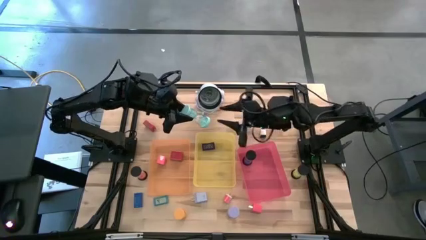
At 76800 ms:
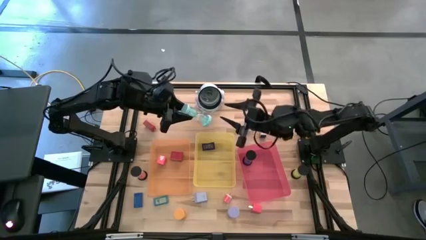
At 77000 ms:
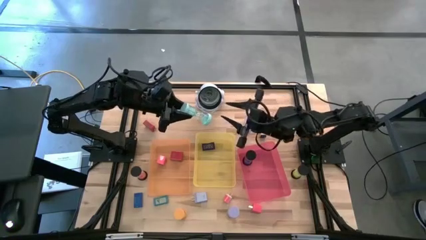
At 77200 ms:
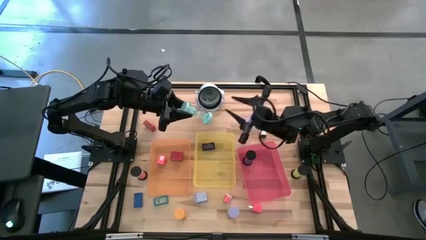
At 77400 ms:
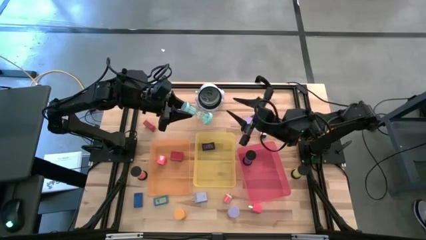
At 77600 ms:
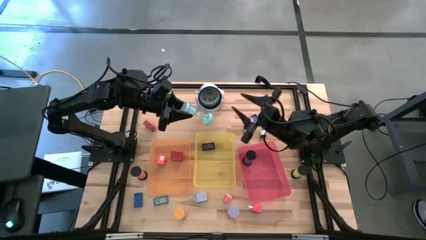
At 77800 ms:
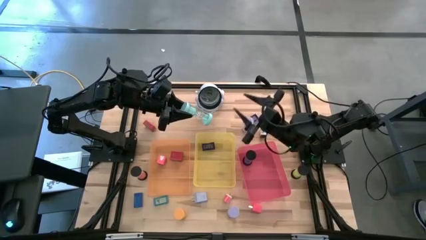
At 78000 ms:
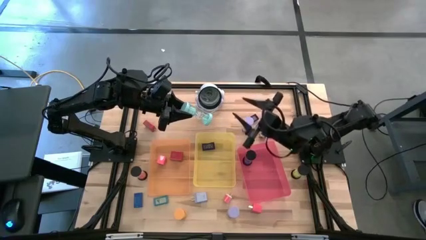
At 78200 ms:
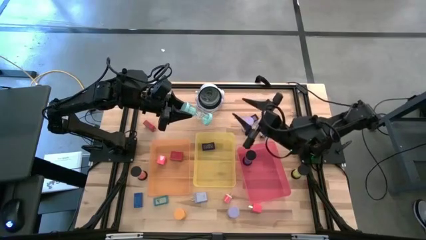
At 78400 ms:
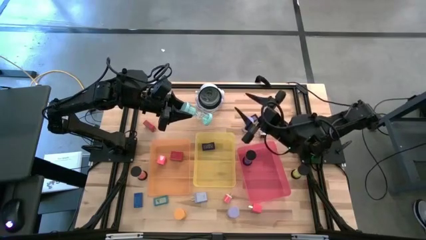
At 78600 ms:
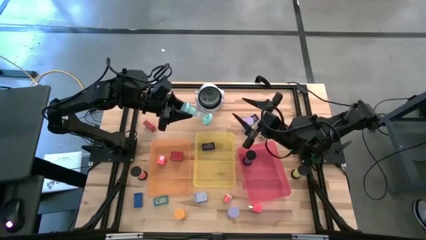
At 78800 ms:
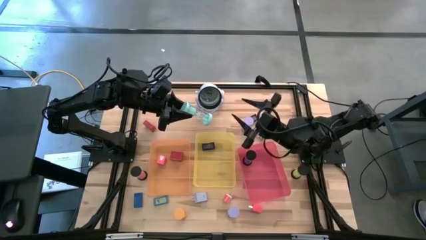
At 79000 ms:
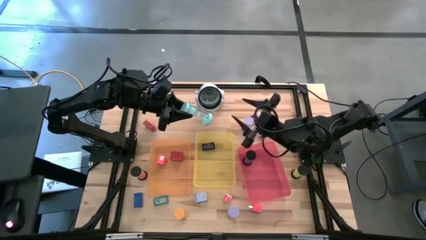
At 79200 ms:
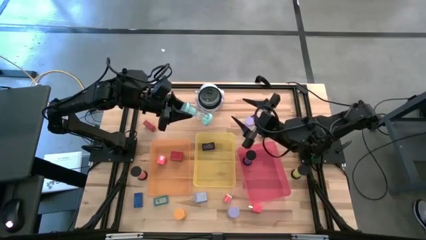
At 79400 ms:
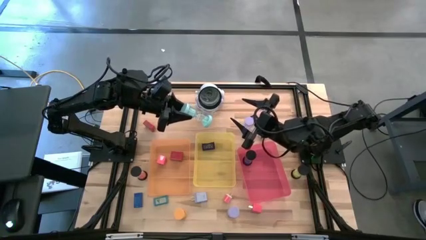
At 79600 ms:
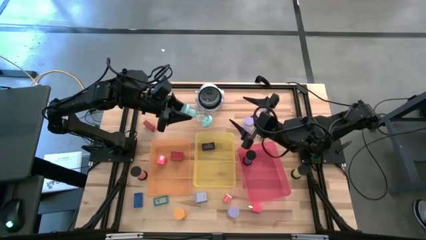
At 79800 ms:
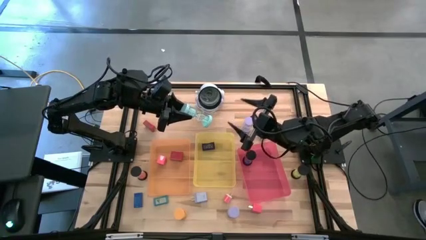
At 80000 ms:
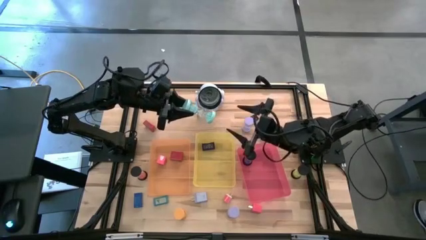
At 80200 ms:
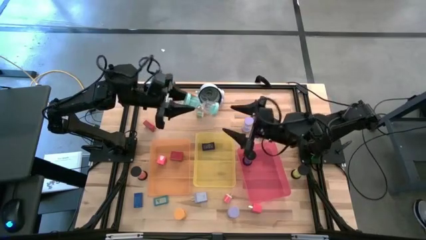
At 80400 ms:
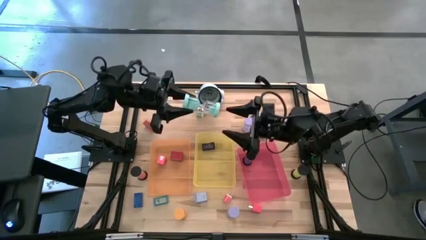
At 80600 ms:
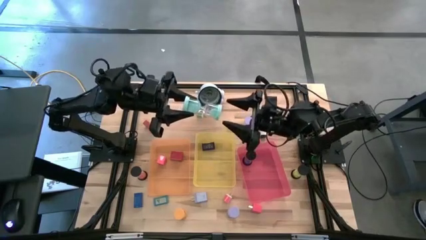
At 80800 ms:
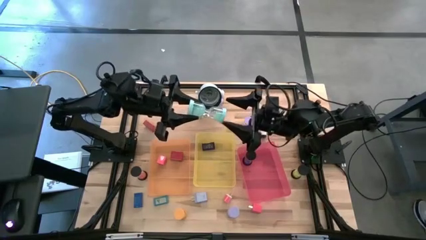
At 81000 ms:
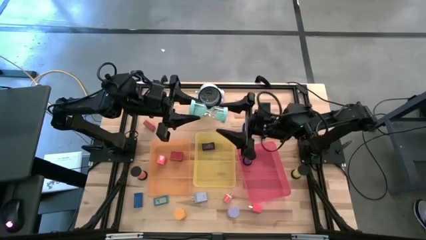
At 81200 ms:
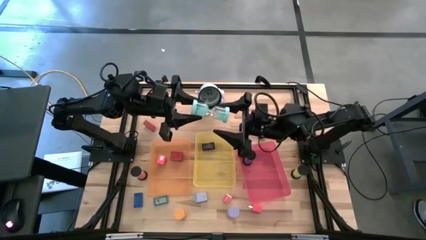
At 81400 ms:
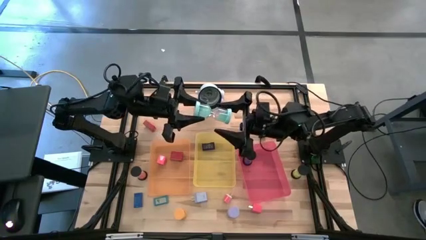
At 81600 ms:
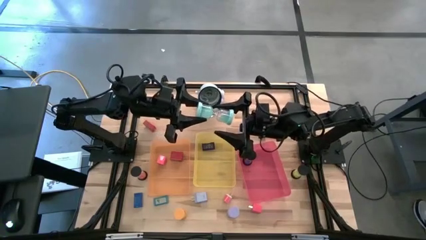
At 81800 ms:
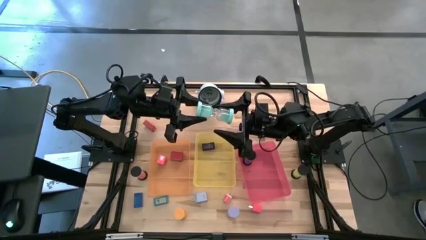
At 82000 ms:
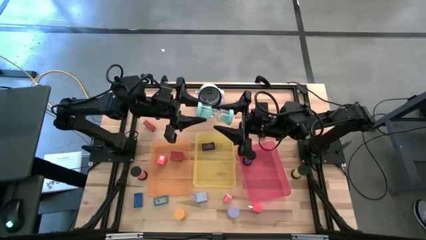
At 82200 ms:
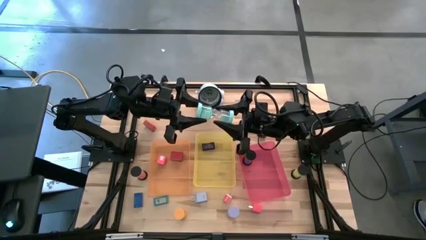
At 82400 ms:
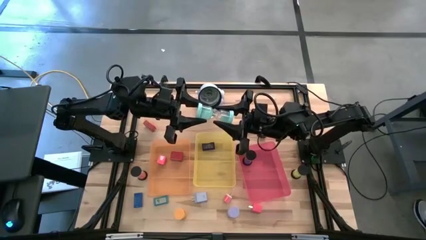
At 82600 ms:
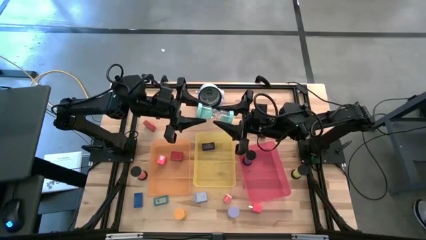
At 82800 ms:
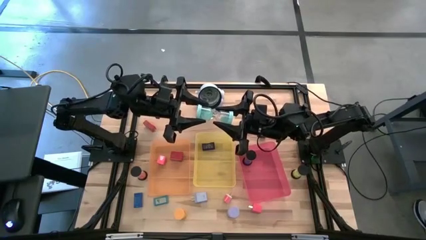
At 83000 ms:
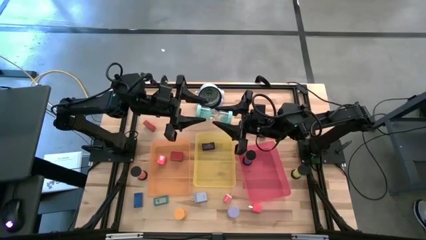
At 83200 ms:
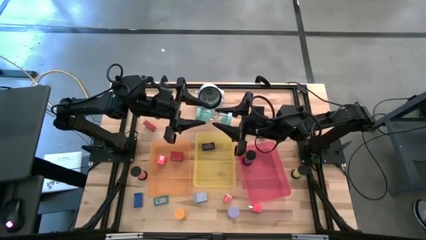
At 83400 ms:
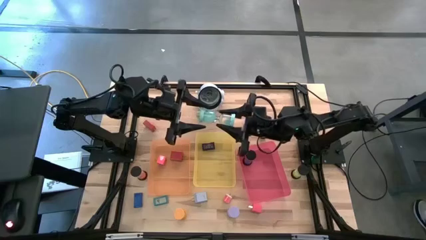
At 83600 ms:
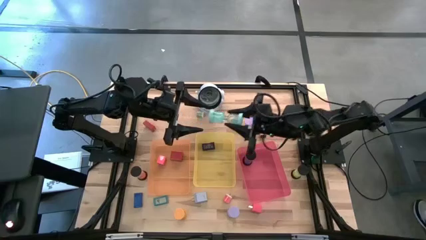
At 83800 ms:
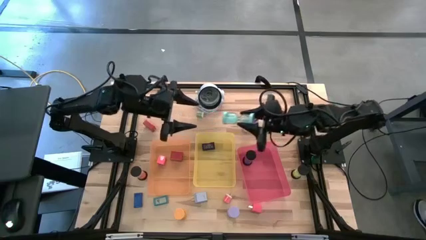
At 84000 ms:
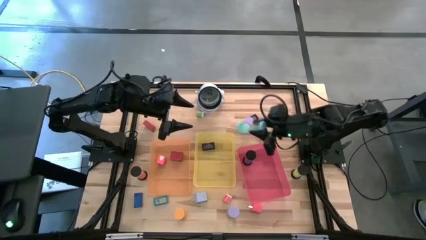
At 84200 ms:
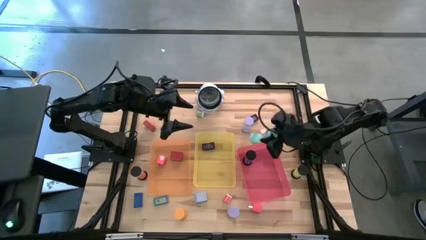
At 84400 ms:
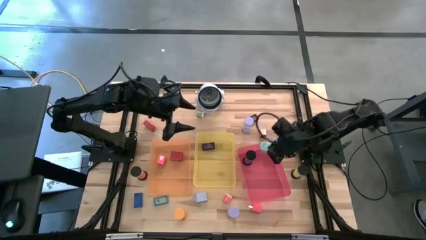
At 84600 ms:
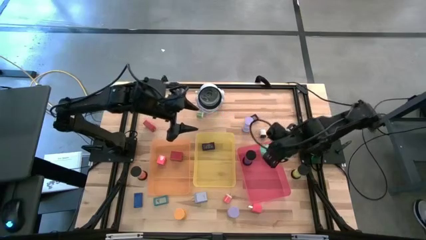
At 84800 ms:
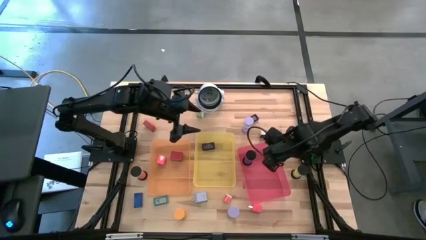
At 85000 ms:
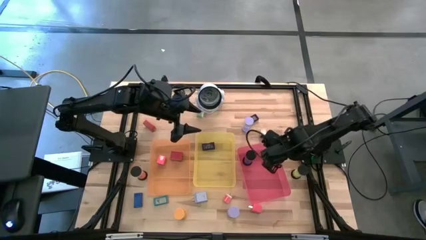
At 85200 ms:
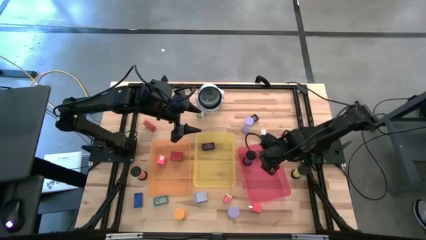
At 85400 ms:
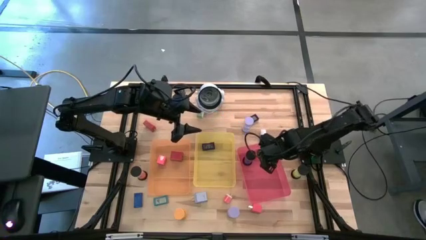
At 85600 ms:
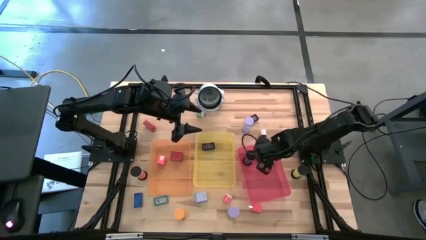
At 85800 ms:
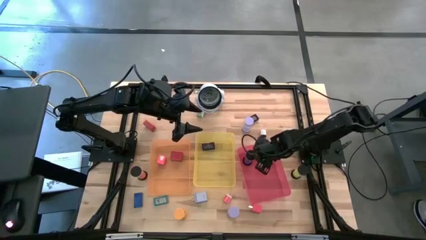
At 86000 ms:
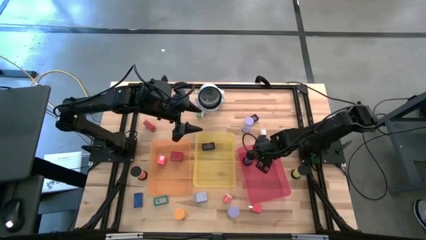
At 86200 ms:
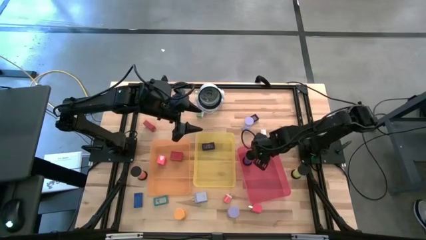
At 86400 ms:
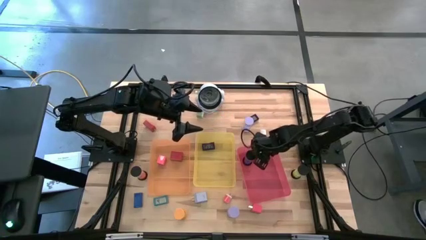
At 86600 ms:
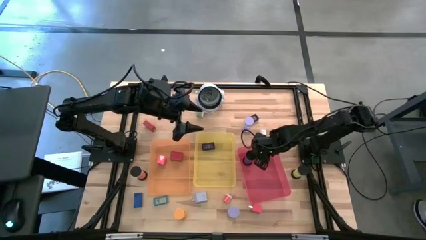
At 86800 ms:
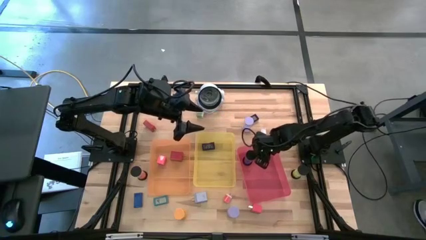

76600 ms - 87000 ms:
Task: Pick & Place Office items
Put the blue hourglass timer into the red bin

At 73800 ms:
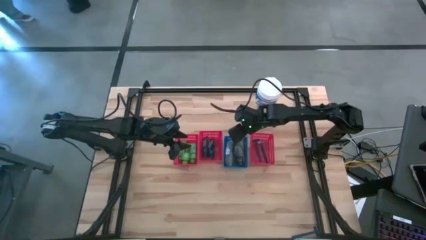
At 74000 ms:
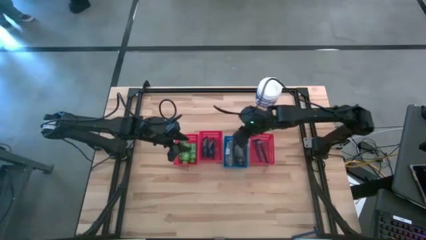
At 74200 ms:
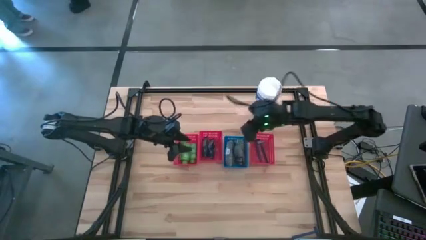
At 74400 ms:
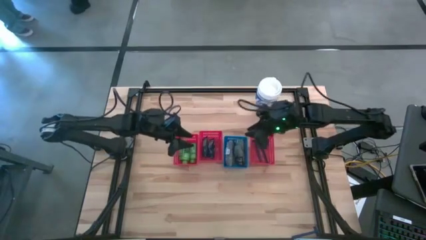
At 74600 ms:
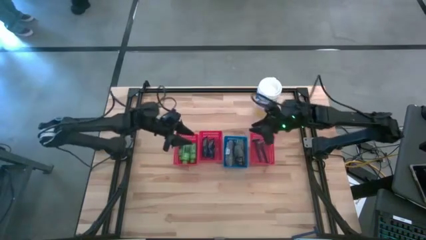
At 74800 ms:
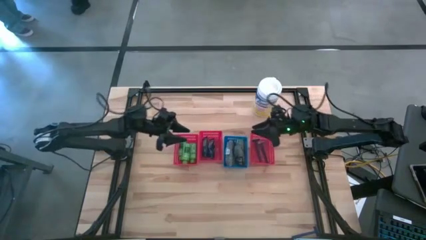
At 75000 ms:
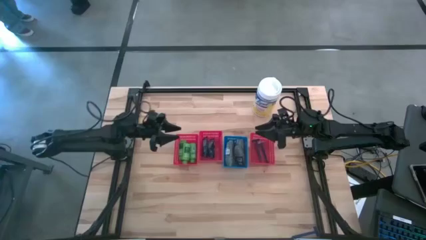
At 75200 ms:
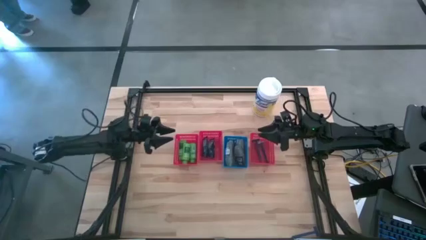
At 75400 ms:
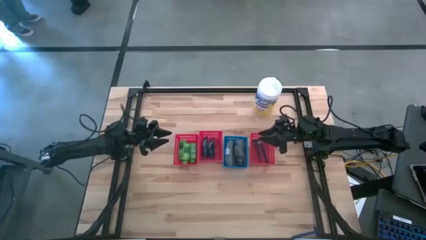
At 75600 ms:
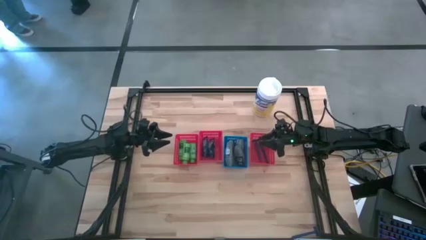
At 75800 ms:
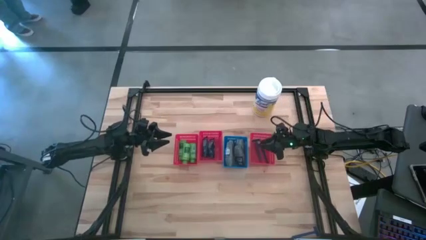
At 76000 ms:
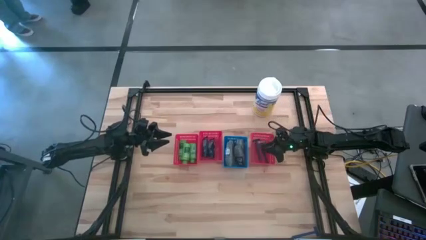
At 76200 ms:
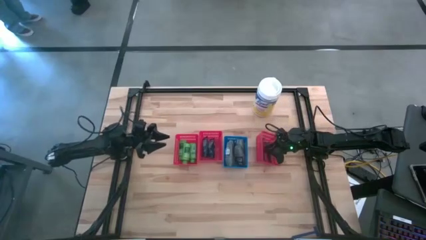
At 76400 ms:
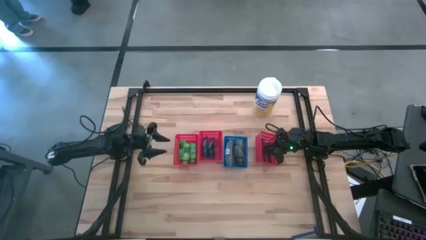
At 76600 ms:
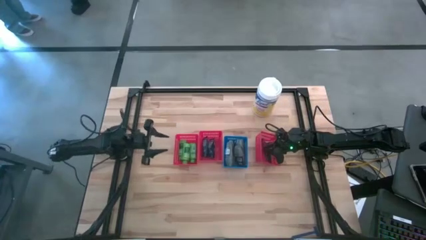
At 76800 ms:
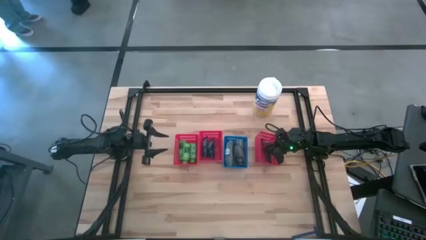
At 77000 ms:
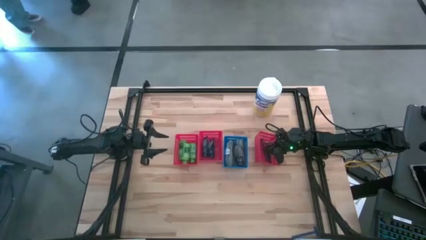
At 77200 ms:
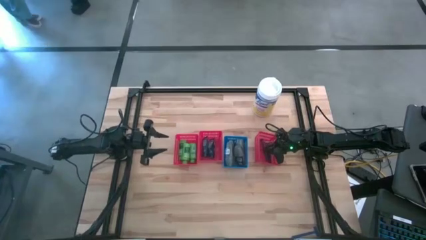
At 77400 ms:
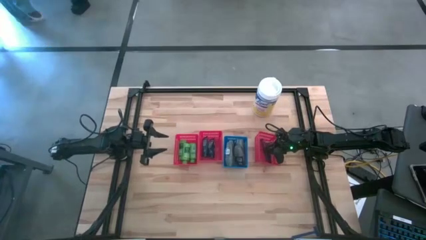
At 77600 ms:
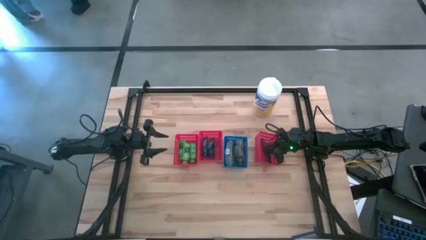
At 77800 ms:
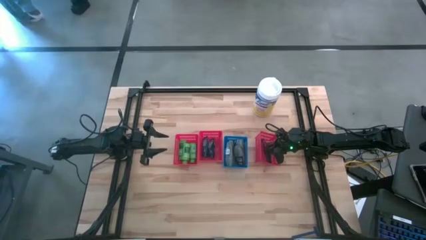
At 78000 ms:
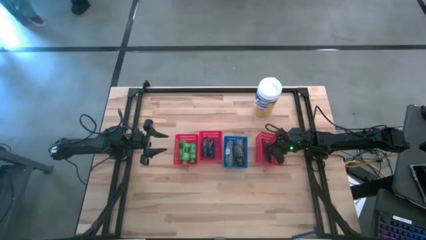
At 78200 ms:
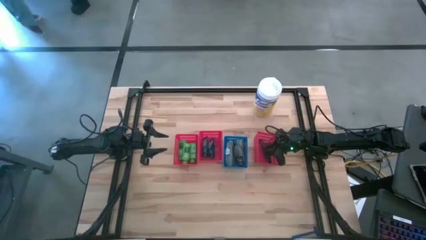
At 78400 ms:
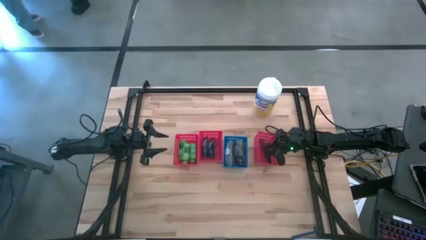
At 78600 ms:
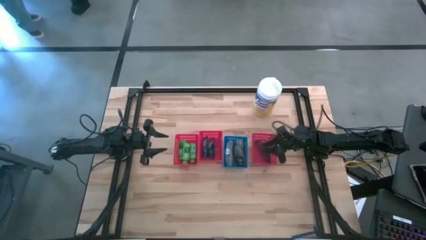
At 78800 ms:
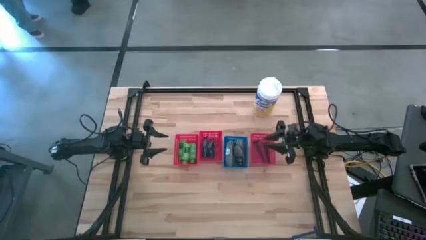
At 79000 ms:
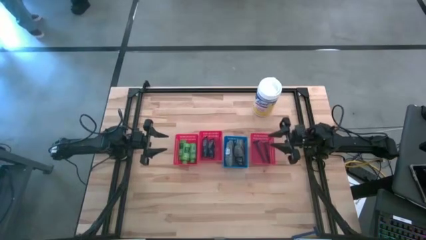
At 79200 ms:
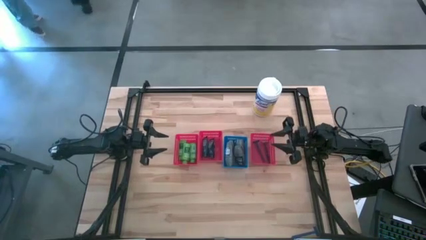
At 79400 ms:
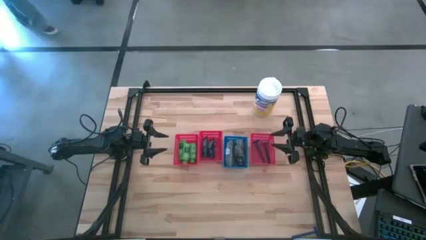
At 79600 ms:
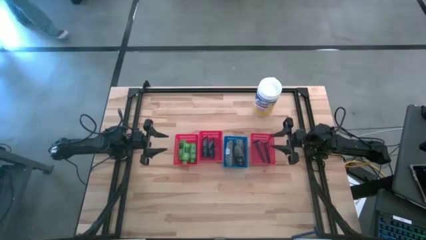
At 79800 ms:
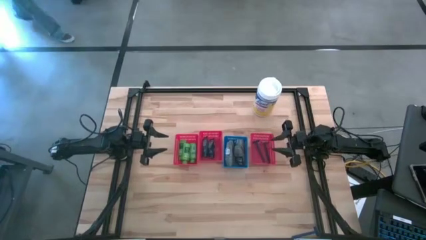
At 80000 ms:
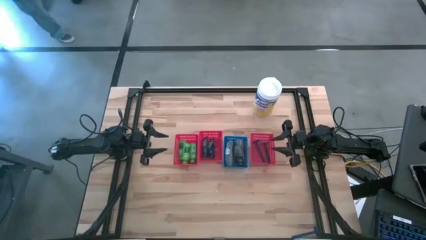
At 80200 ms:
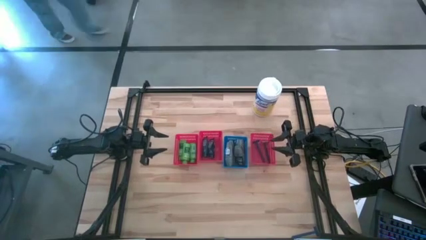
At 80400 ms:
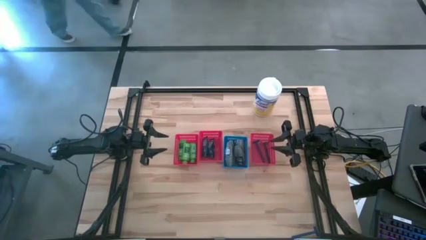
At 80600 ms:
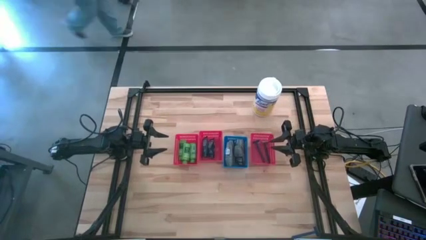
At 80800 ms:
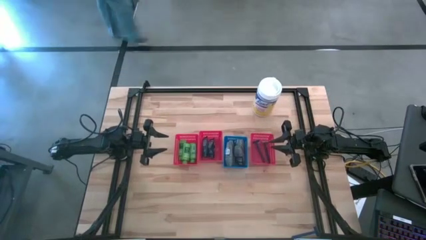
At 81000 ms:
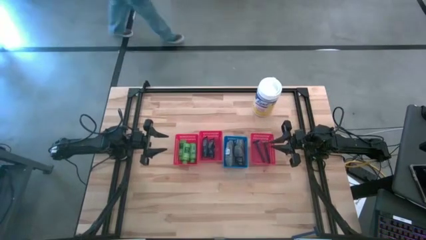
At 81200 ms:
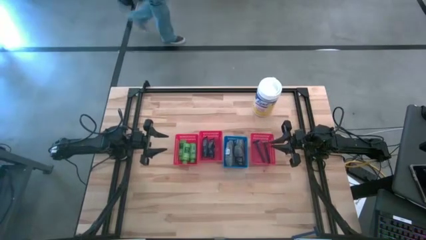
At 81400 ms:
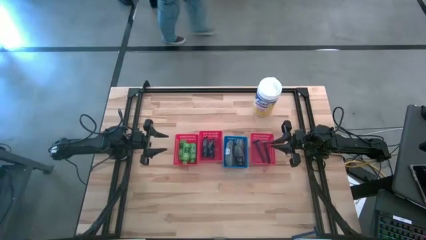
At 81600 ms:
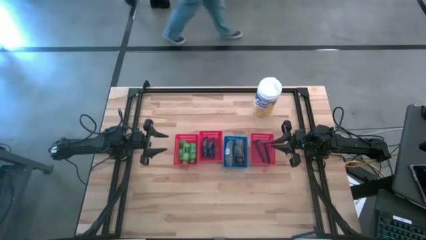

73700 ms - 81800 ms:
Task: Pick & Place Travel size toiletries
Return to Home Position
